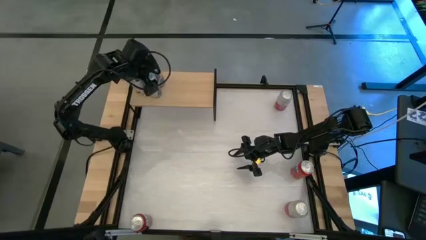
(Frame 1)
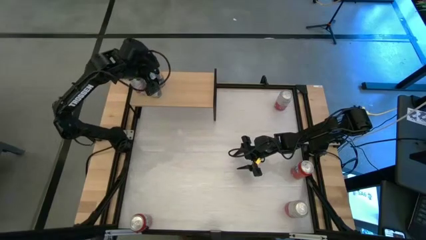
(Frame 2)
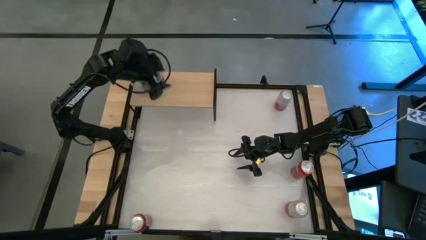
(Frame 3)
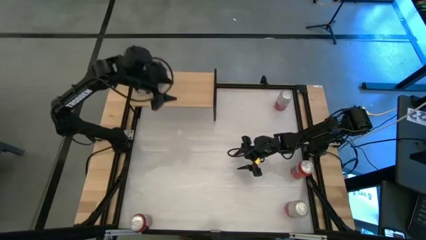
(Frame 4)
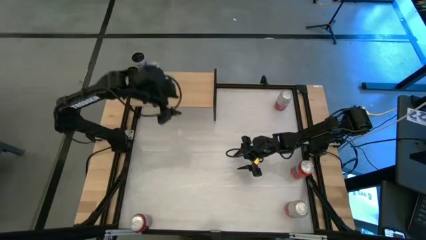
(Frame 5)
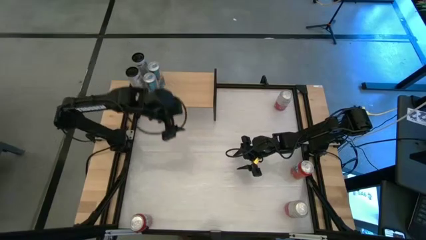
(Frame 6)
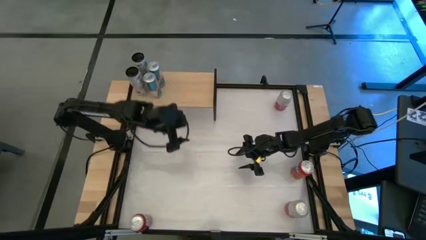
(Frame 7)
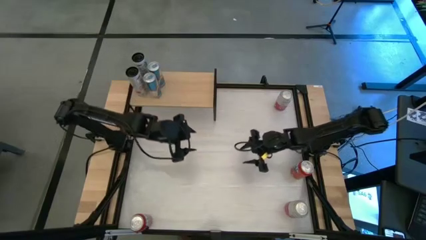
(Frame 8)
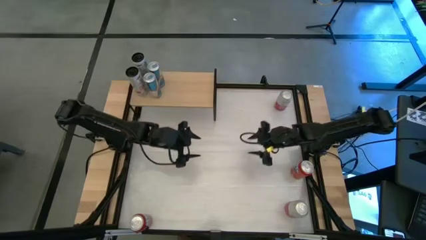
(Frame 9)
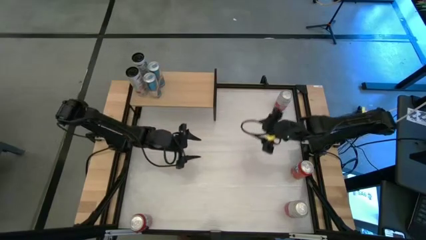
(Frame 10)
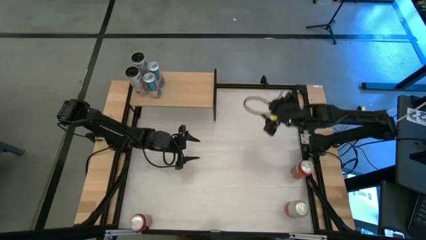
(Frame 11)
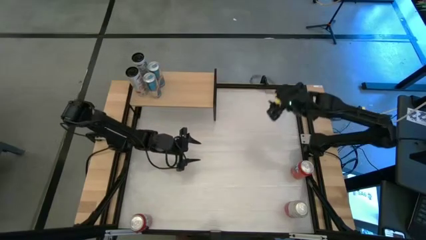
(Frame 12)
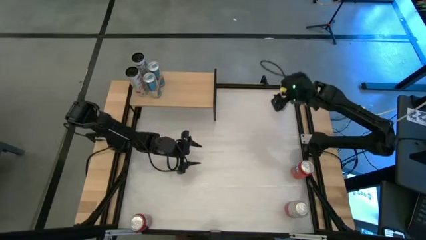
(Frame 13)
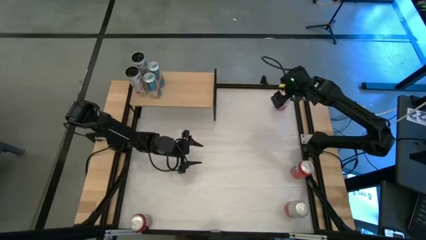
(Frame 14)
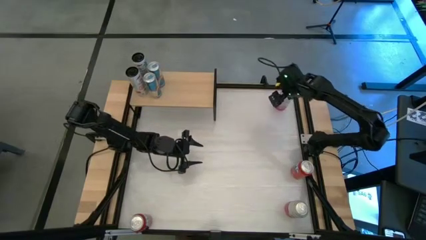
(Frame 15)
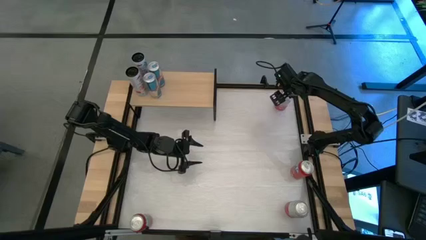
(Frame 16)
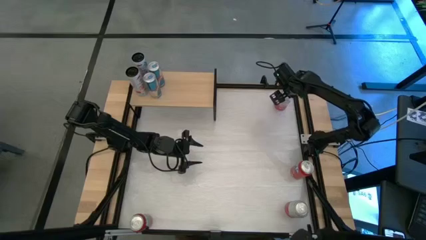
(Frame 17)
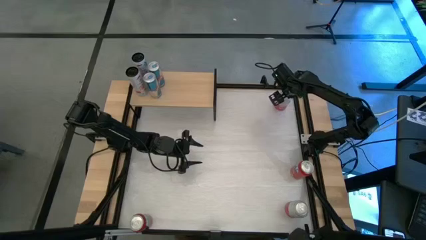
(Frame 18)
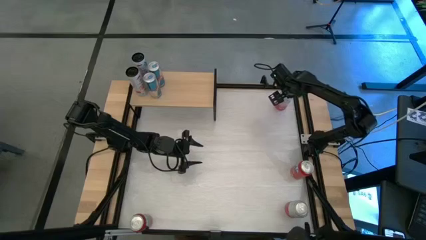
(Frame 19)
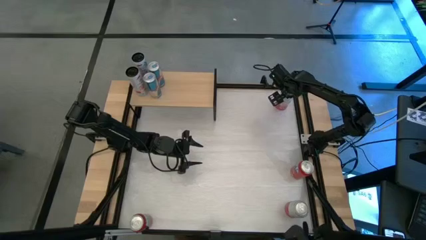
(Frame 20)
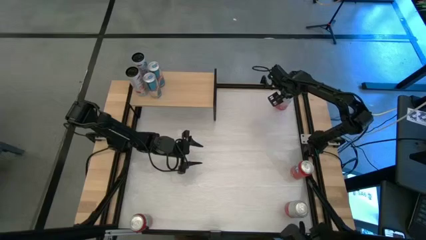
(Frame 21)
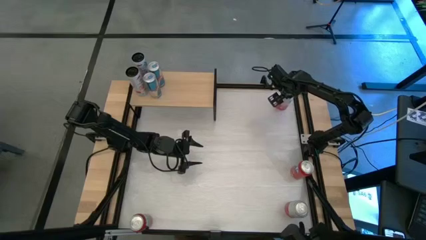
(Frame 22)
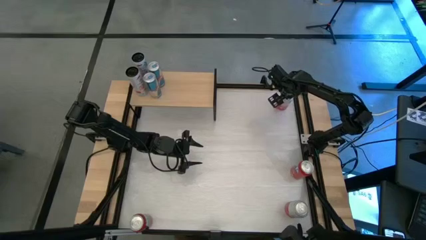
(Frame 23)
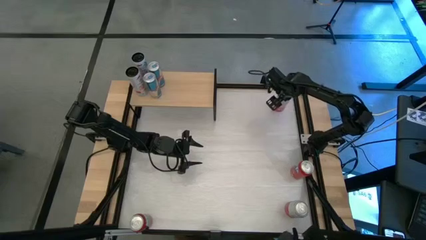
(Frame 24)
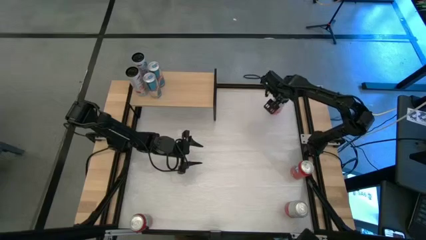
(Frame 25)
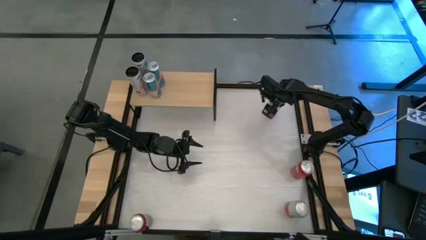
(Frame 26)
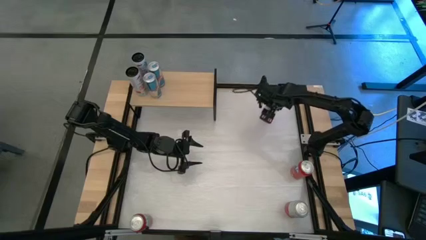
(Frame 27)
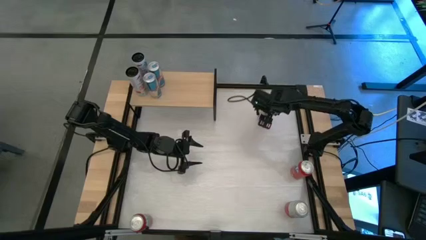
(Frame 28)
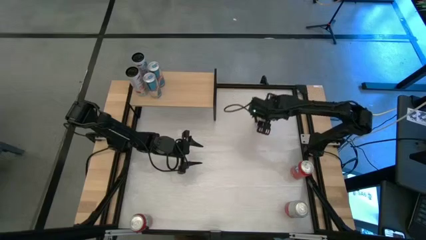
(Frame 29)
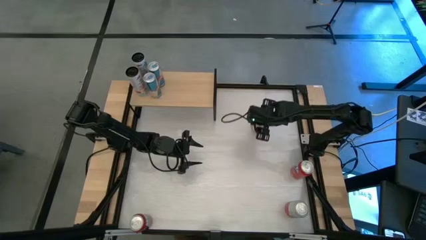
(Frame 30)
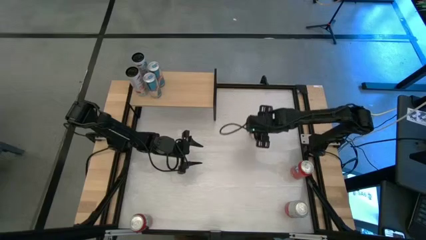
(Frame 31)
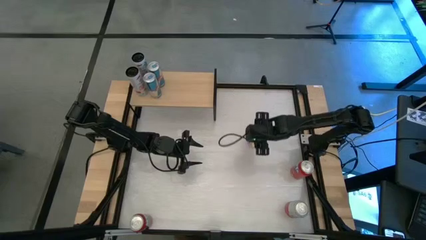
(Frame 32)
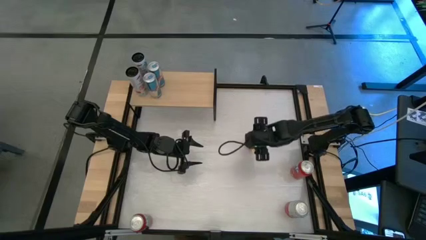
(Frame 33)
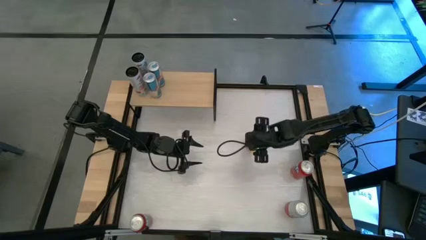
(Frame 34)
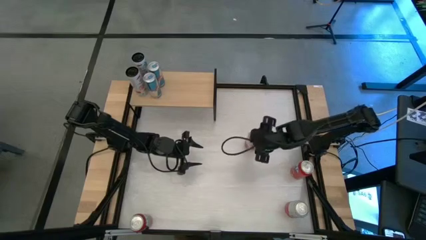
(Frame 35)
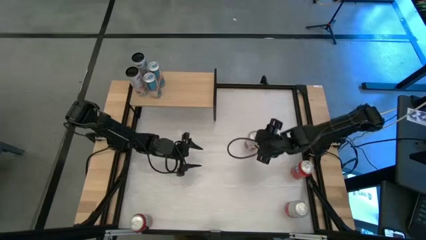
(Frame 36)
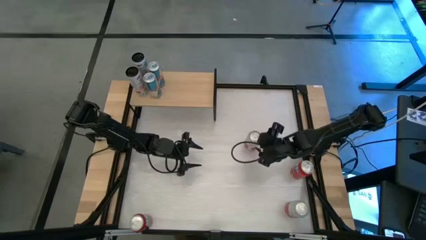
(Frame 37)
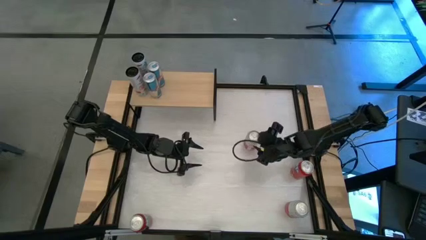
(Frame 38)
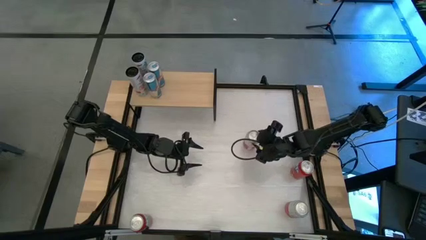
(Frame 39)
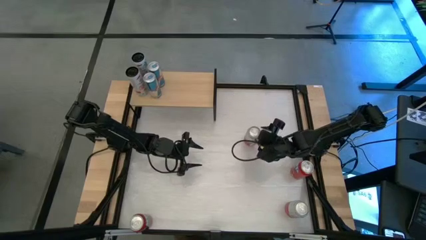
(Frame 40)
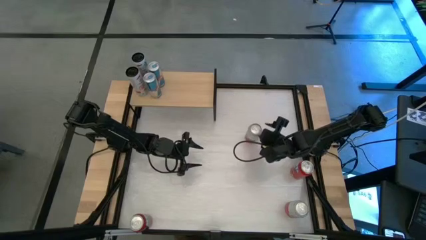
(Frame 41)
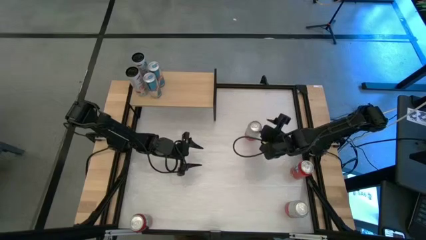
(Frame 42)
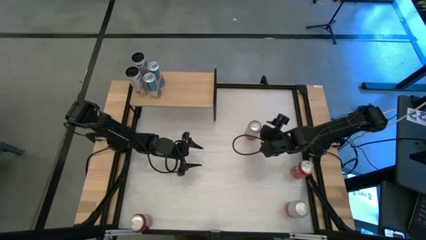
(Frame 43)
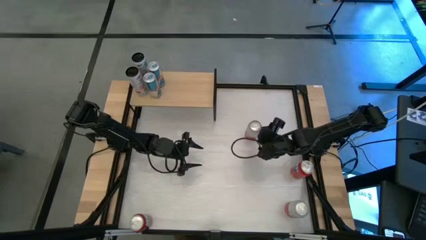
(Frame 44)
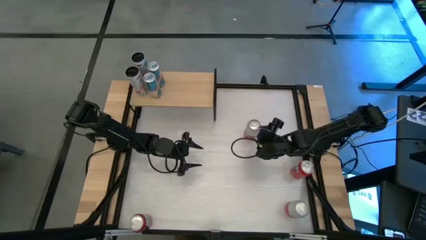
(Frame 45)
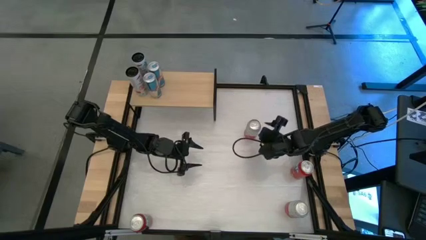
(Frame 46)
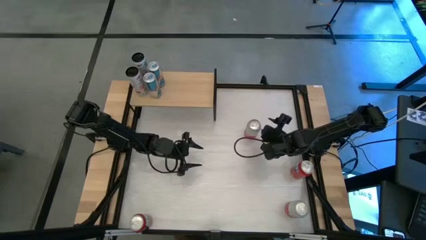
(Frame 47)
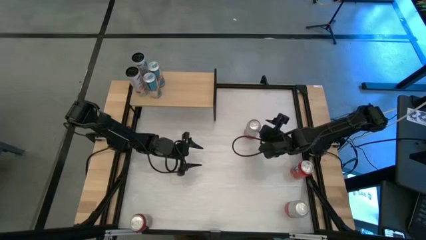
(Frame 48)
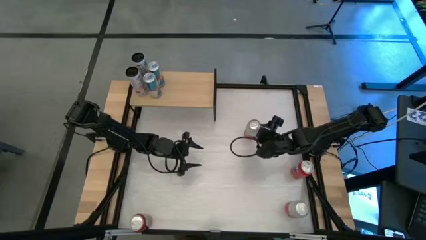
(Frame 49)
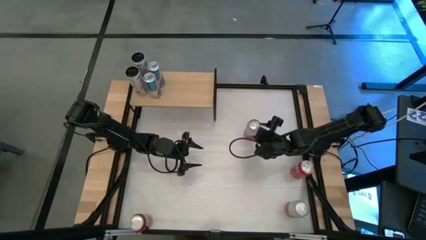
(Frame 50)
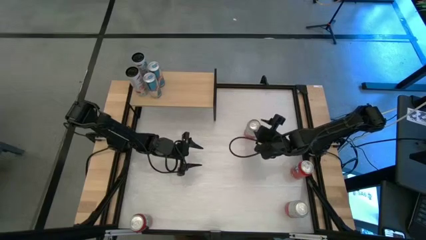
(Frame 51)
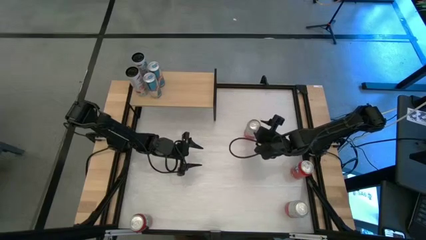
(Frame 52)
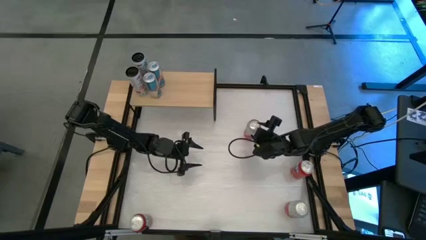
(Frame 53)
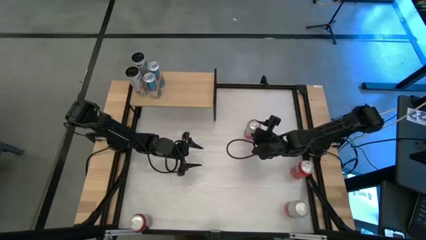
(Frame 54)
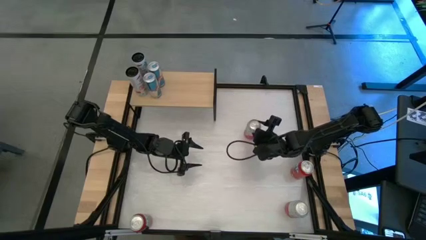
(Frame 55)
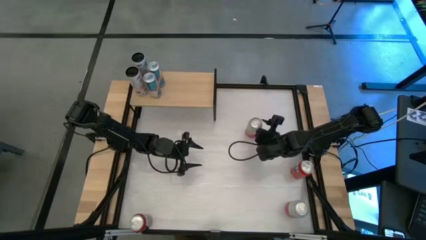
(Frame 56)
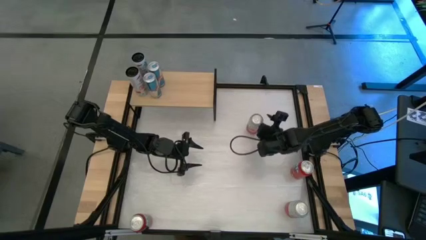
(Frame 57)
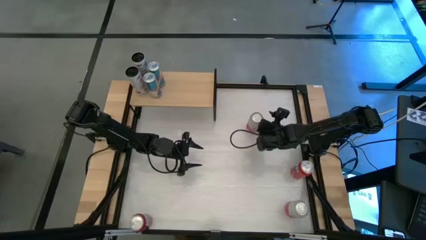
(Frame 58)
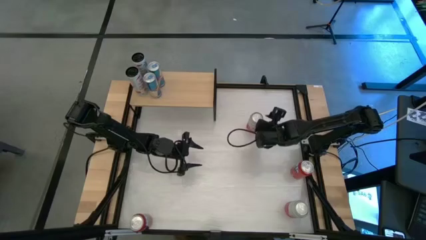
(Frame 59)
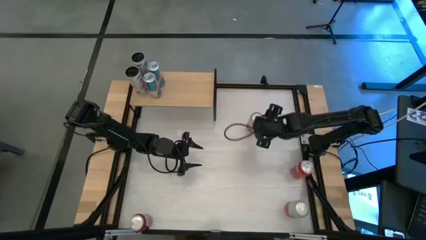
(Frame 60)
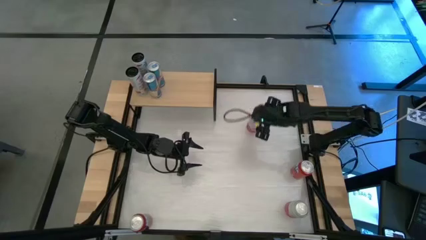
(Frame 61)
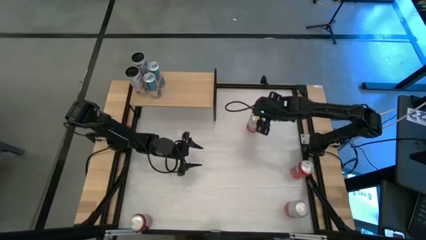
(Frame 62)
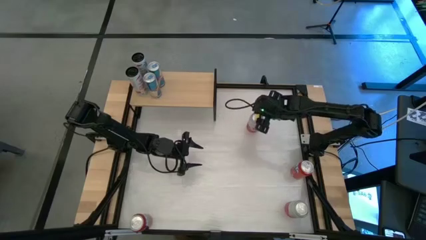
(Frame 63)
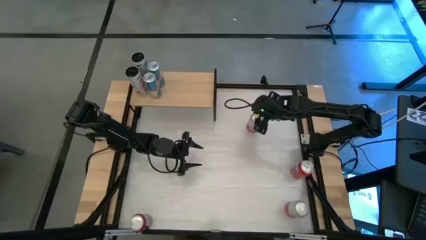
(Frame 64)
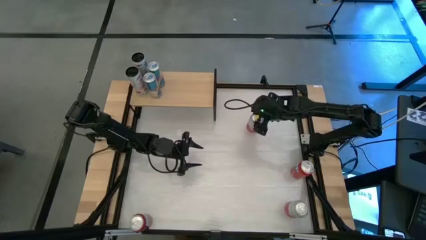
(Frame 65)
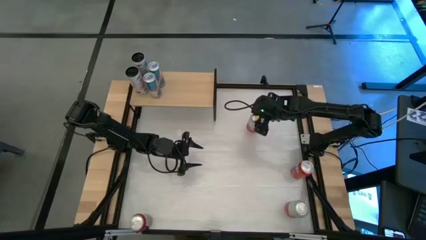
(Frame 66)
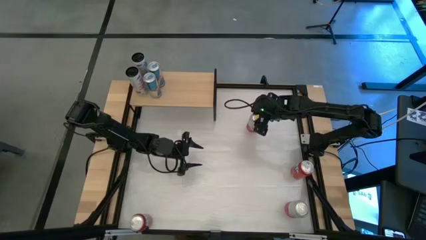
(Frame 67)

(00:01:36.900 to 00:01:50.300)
Task: Place canned beverage on shelf
Put the top pink white soda can on the shelf

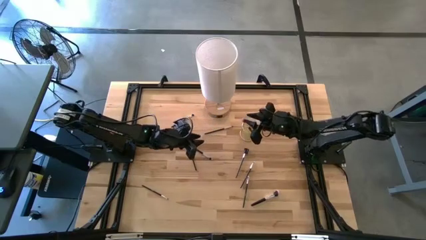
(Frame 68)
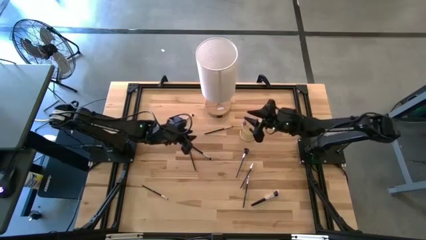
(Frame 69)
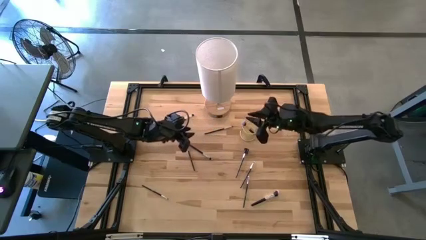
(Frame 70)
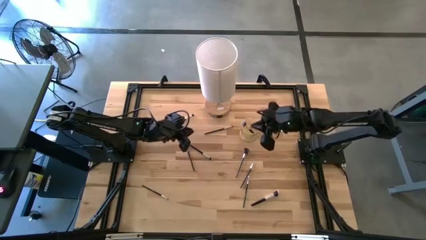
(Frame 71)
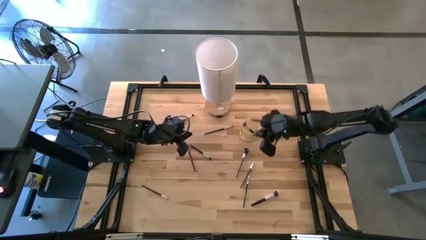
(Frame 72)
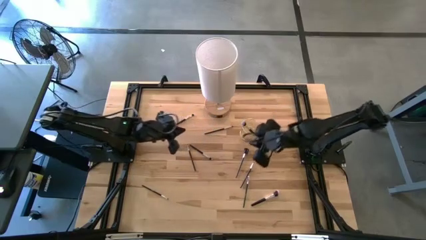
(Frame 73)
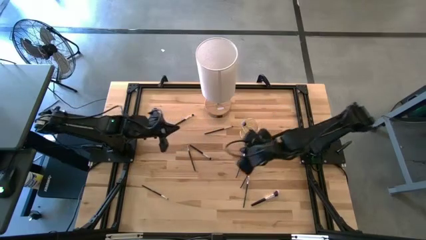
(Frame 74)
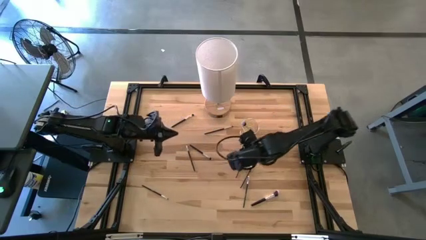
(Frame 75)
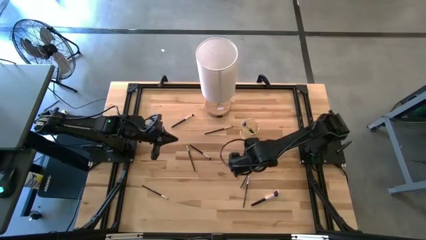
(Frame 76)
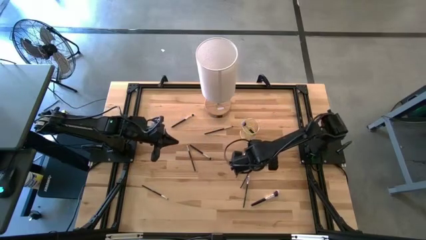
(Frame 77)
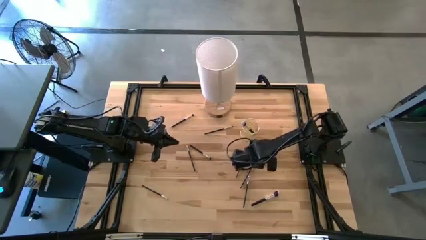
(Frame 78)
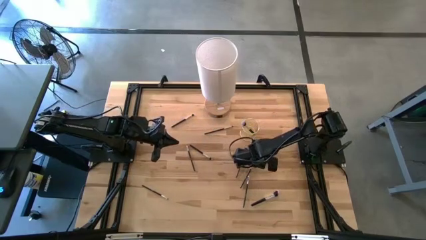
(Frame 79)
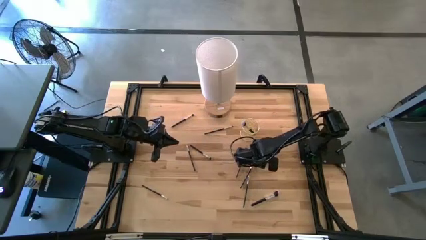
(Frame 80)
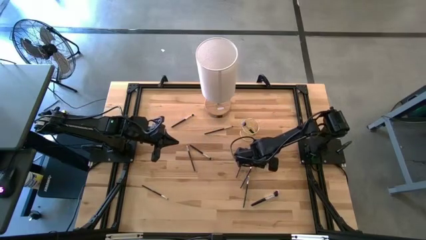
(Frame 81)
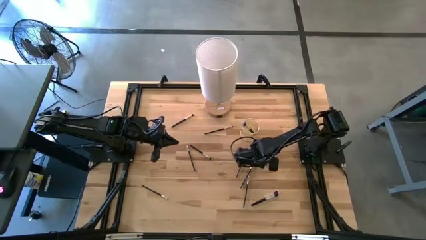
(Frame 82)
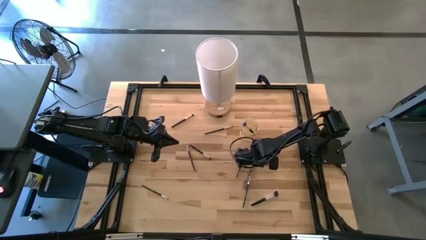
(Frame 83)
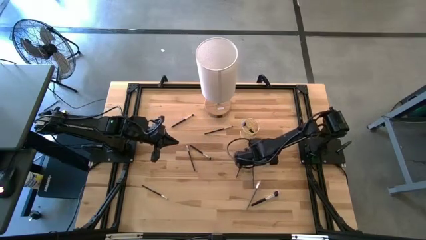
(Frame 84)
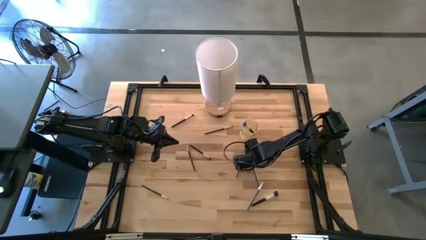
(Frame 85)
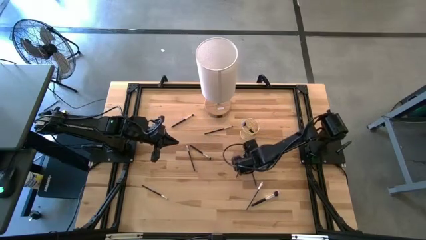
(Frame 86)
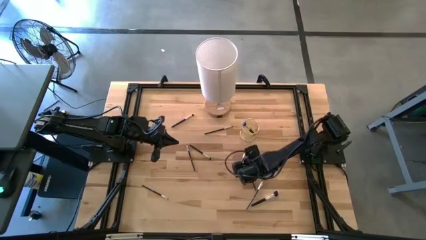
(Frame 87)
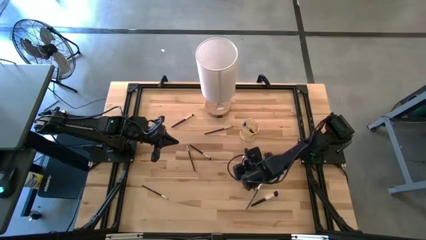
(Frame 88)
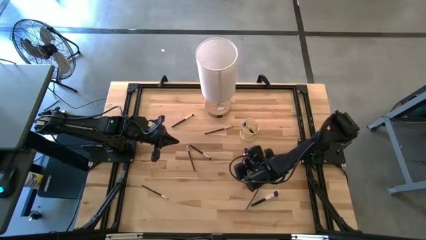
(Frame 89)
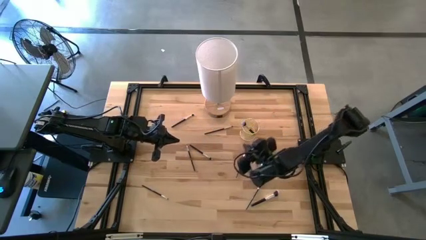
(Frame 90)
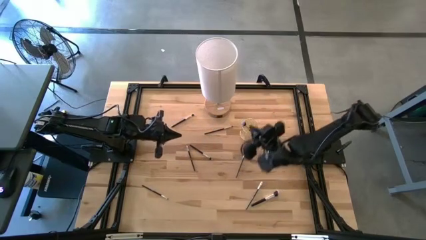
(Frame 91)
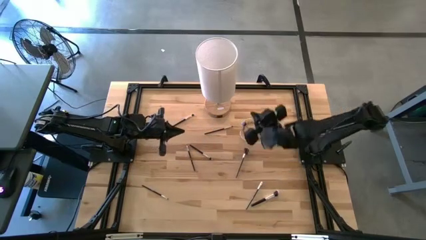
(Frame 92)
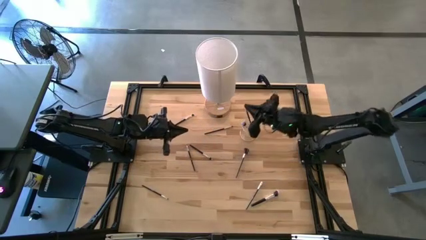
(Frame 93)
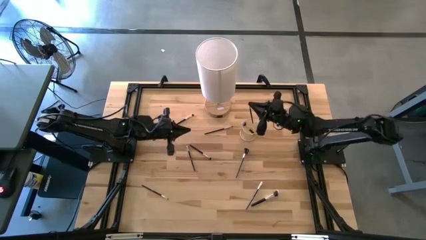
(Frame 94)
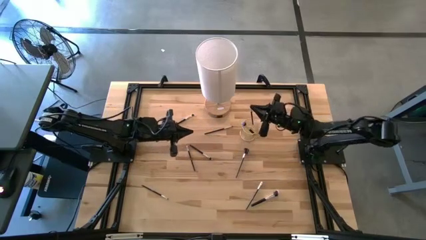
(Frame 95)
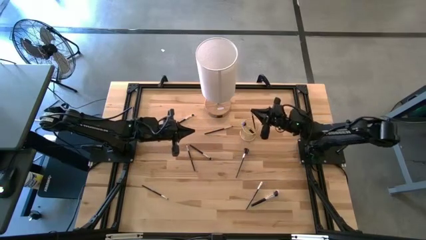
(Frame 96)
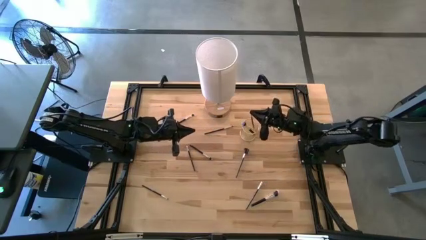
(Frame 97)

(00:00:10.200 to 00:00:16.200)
Task: Pick & Place Makeup Brushes
Put the black eyeshadow brush into the makeup brush holder
